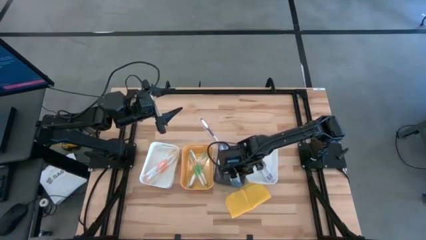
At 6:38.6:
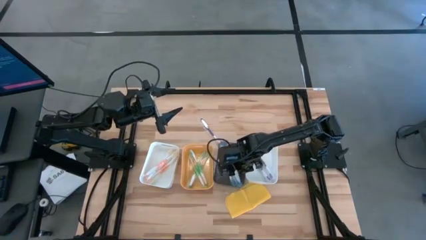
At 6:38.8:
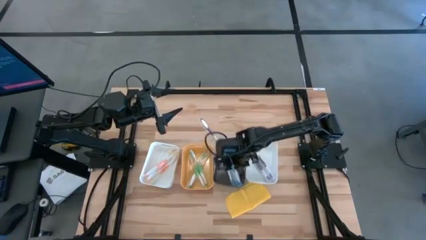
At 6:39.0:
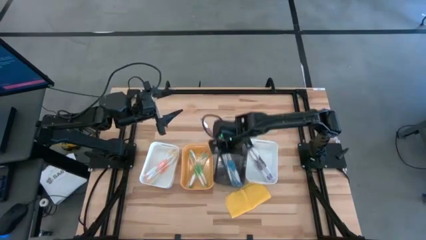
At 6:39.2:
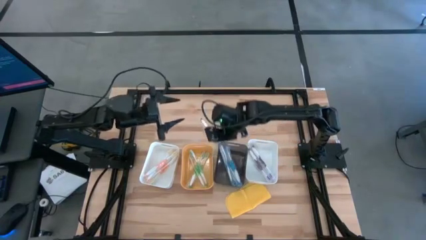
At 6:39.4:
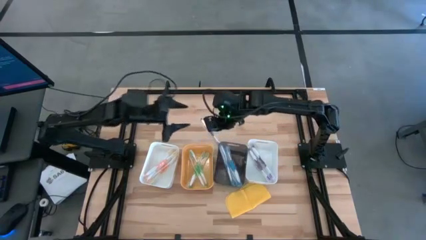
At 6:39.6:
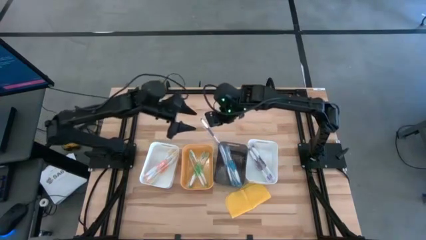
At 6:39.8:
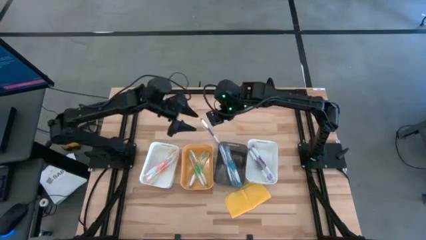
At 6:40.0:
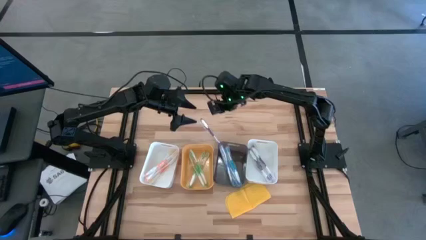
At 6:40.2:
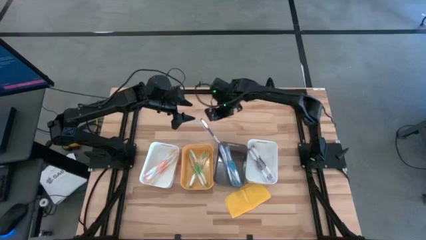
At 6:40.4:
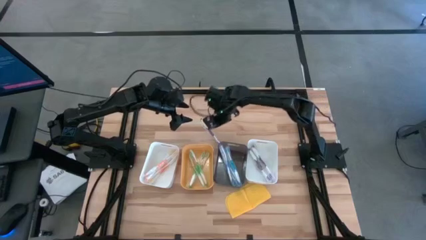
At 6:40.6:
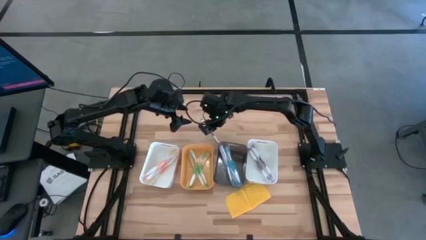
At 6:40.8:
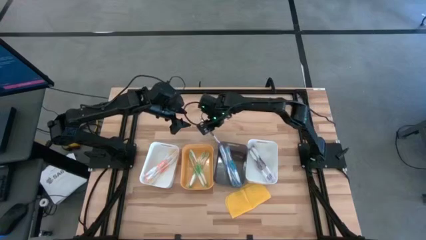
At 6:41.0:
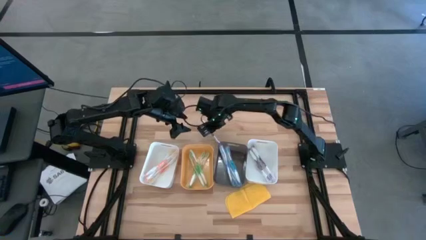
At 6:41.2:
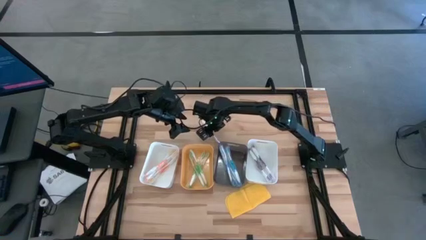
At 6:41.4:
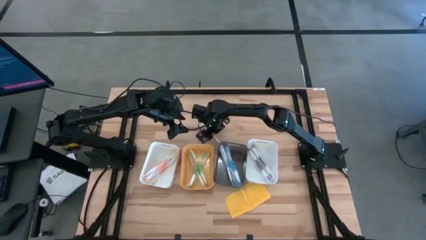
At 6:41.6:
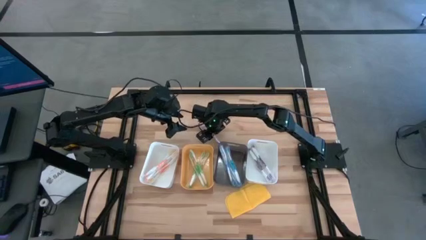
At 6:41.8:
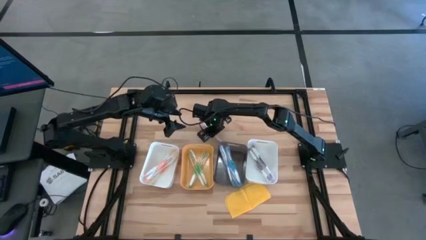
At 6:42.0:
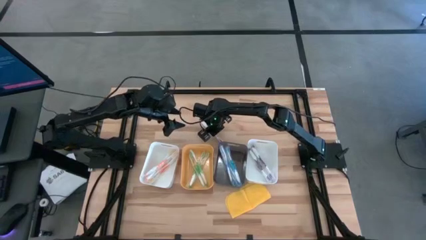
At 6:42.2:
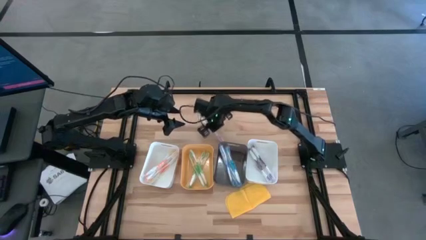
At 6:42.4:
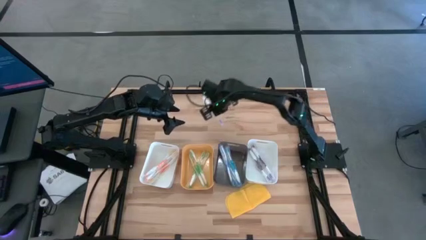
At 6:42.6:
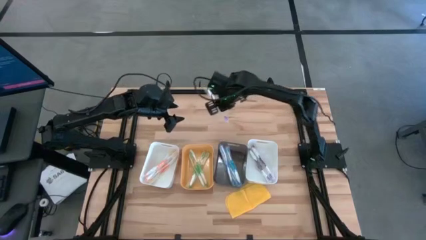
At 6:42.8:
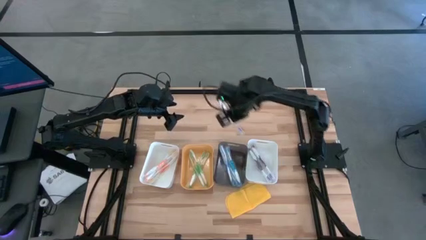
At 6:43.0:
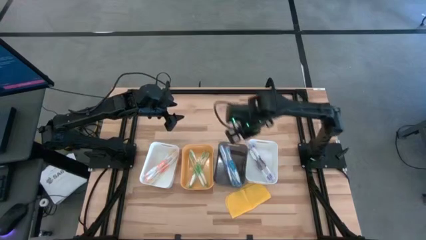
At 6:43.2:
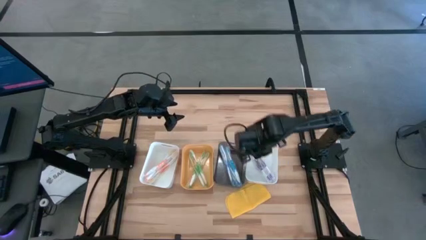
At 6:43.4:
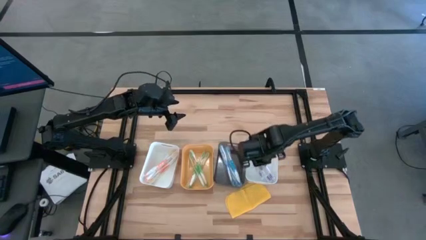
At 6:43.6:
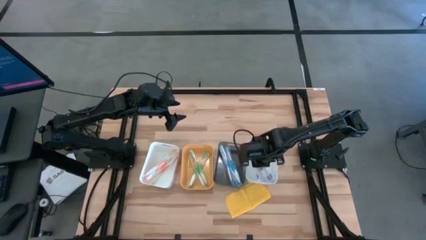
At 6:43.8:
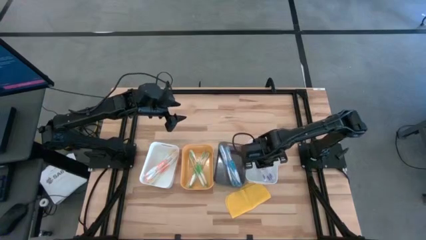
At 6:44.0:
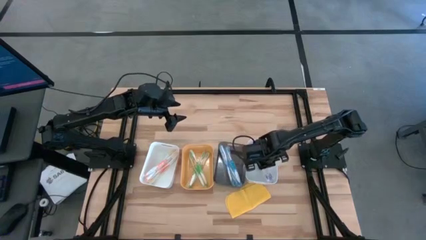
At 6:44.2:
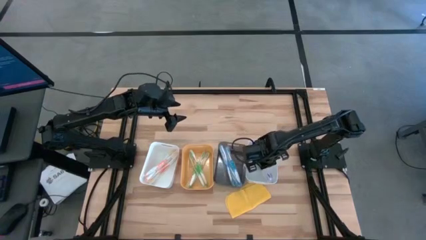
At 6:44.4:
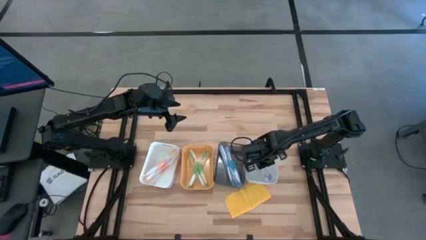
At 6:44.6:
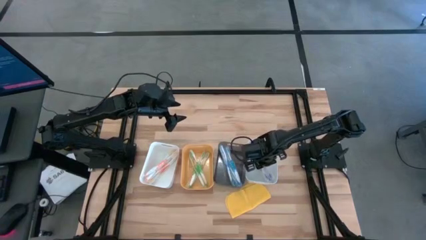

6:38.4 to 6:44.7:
Task: Pick & Place Toothbrushes
Put the purple toothbrush into the right white bin

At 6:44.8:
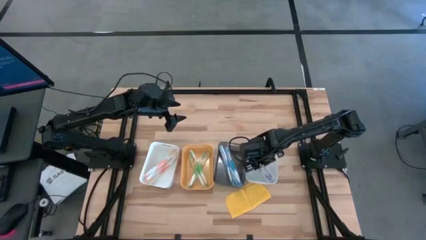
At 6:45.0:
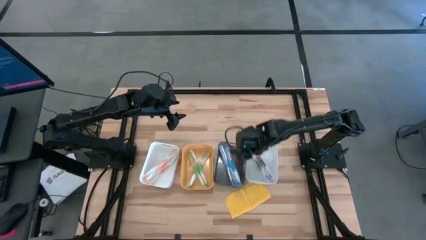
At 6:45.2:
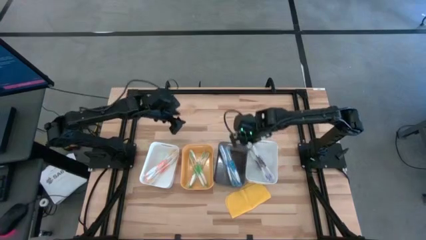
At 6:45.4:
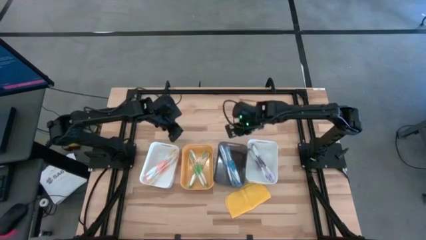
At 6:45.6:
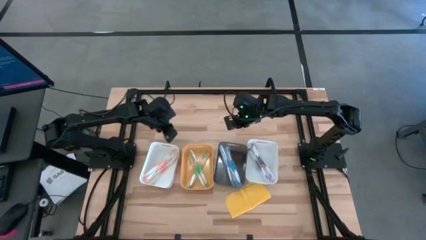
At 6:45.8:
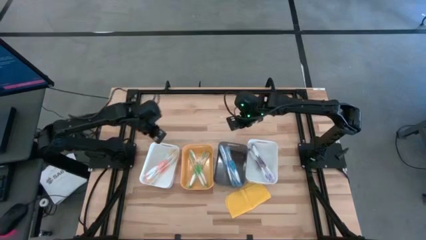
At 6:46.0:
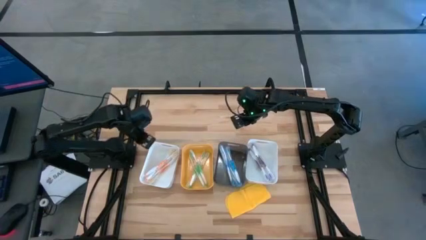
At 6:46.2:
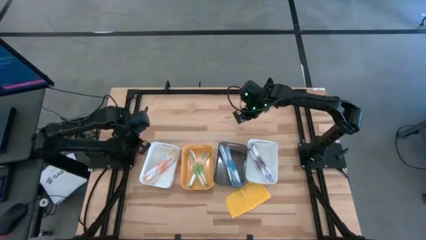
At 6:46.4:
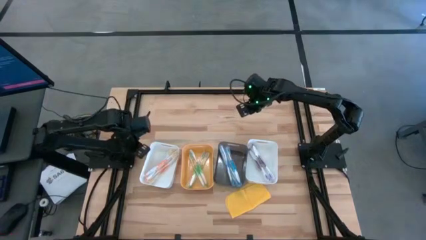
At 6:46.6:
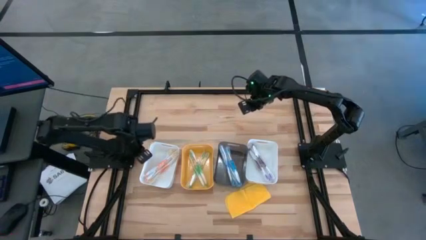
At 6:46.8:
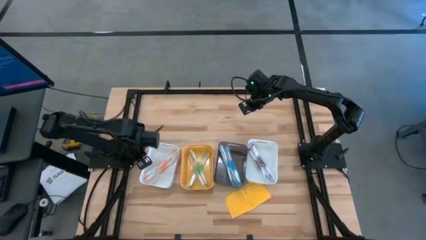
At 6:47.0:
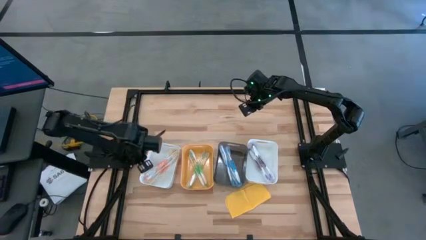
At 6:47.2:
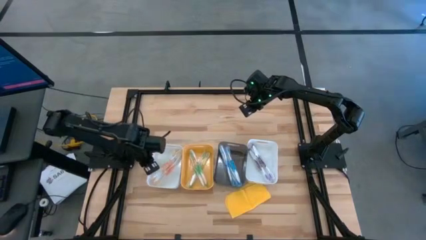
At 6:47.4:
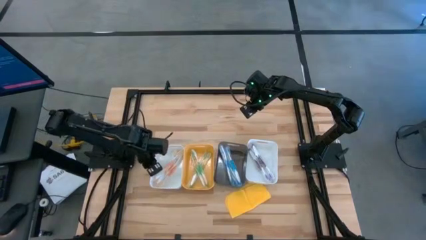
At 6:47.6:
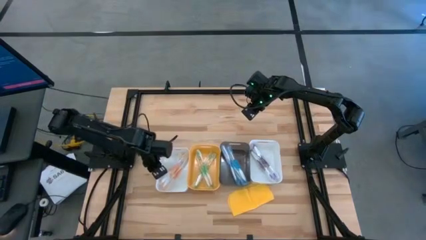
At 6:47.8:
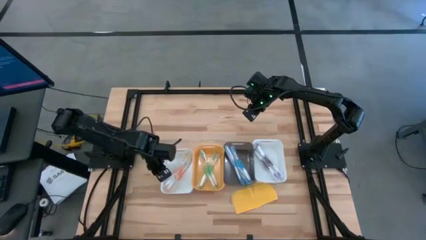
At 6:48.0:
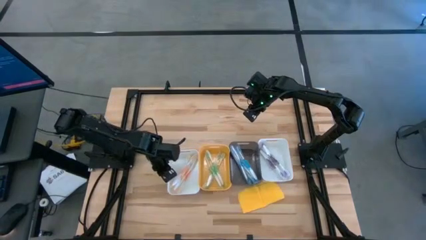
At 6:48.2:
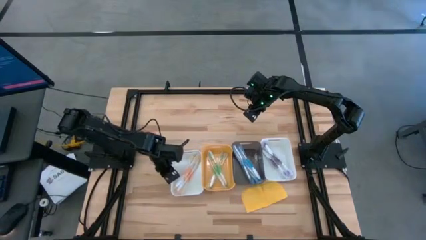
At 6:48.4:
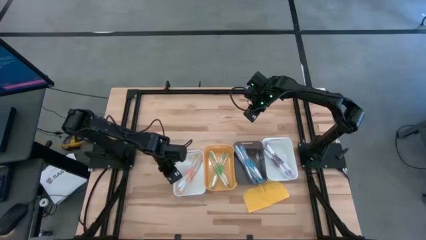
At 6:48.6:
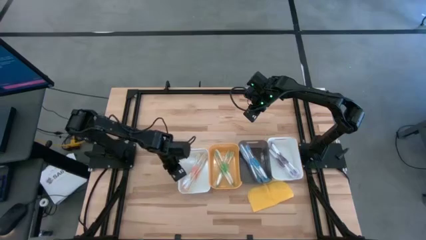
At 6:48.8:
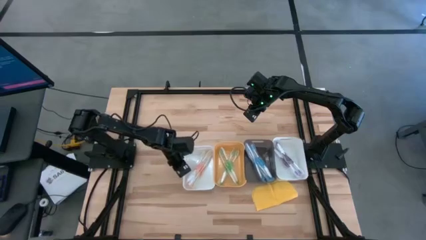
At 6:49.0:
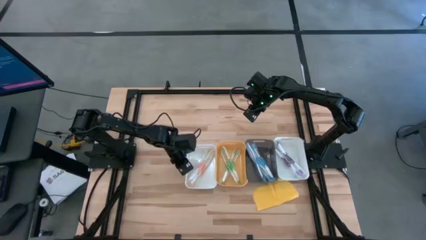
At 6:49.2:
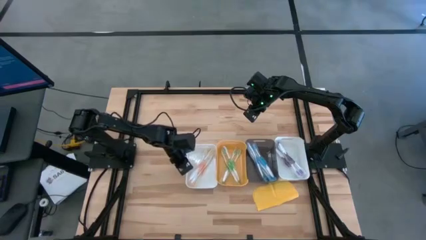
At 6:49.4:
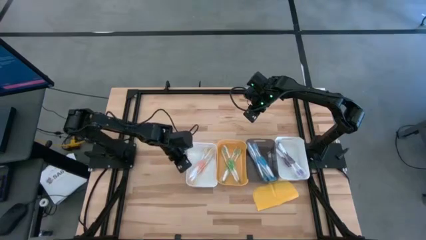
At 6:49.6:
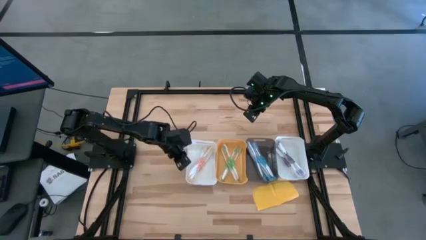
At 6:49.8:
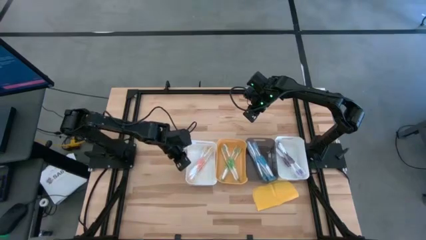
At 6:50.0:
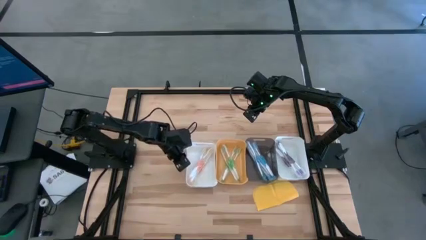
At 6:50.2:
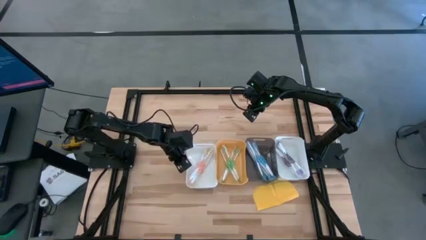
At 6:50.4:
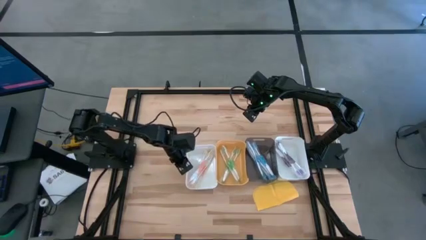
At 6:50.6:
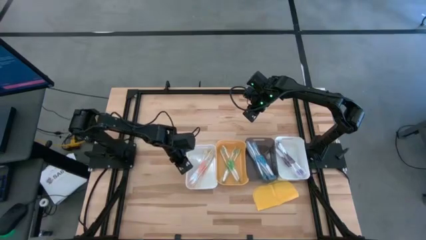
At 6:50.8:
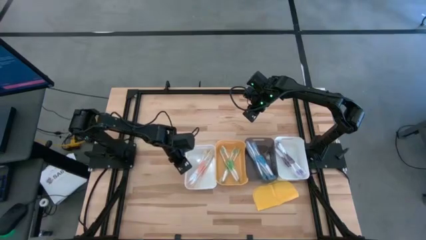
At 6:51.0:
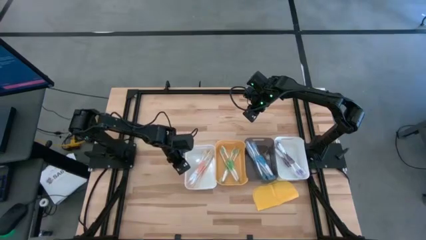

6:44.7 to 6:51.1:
Adjust the bins
